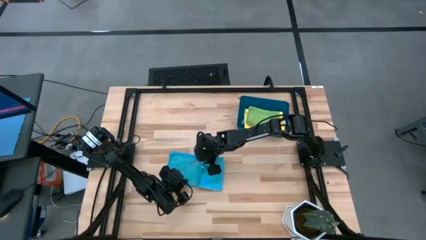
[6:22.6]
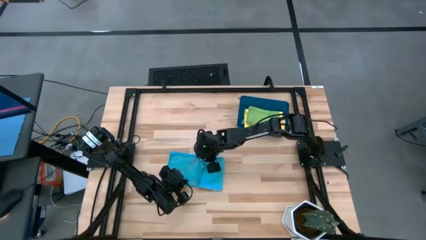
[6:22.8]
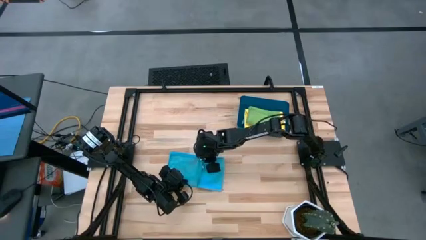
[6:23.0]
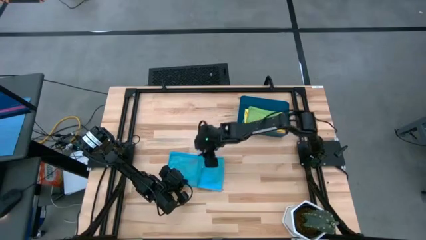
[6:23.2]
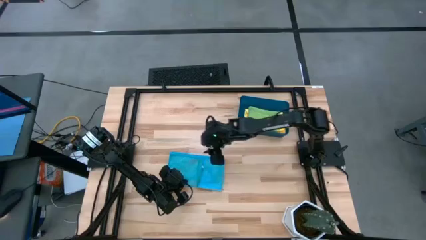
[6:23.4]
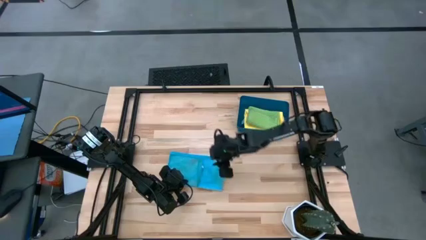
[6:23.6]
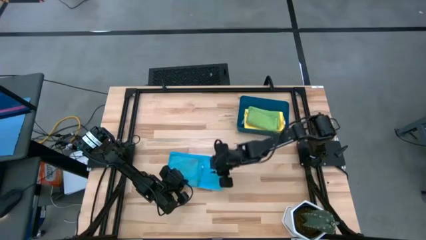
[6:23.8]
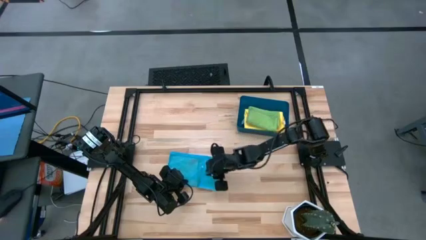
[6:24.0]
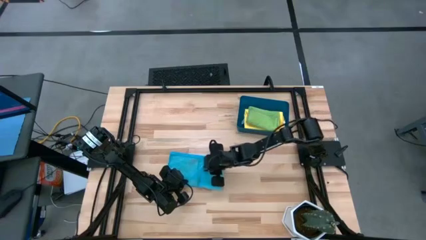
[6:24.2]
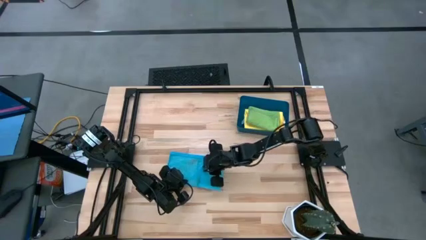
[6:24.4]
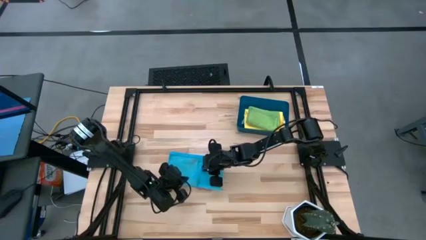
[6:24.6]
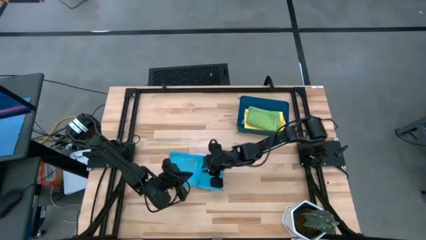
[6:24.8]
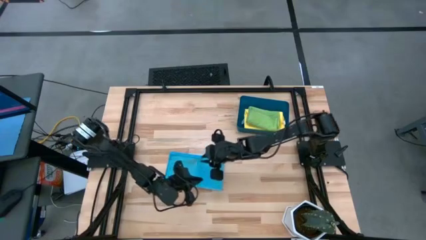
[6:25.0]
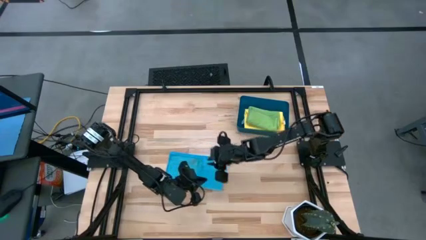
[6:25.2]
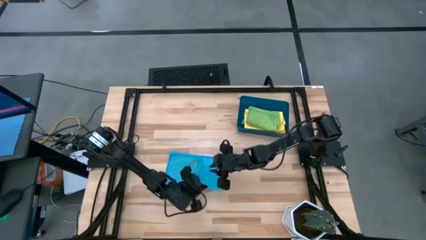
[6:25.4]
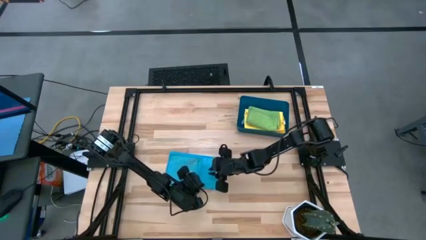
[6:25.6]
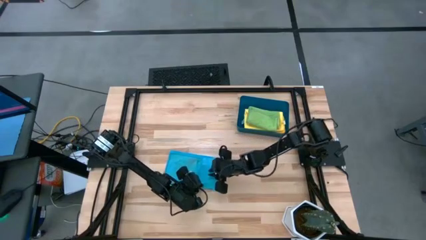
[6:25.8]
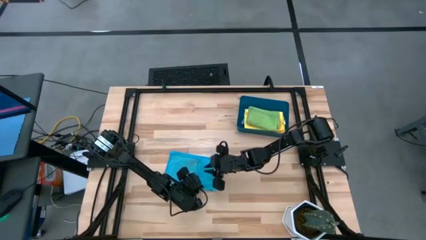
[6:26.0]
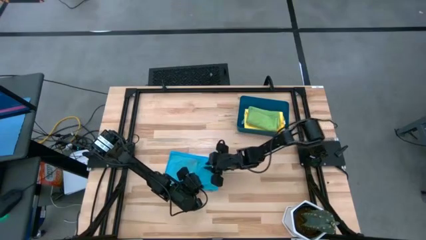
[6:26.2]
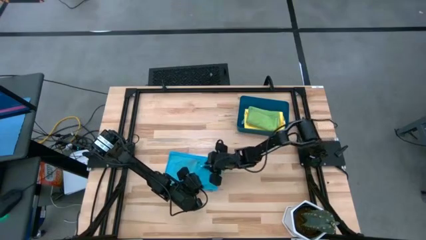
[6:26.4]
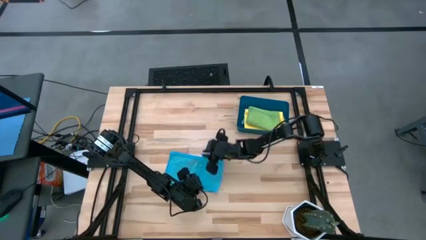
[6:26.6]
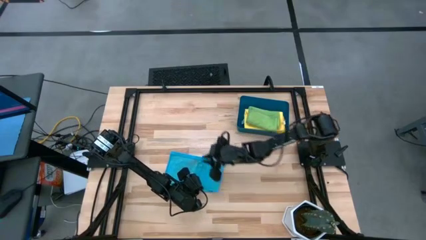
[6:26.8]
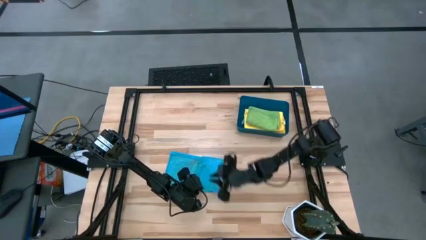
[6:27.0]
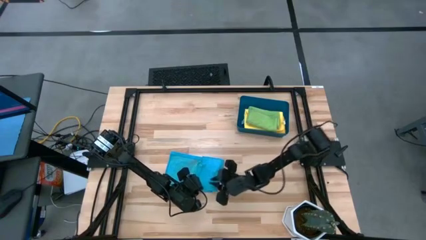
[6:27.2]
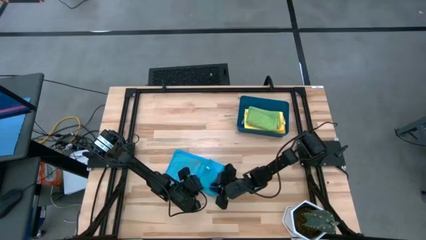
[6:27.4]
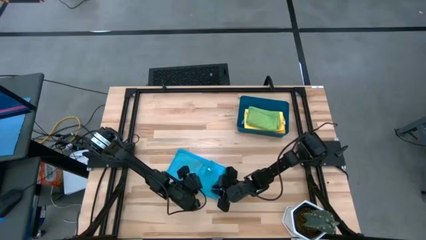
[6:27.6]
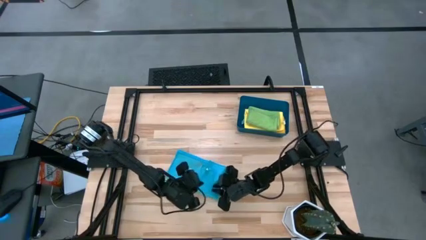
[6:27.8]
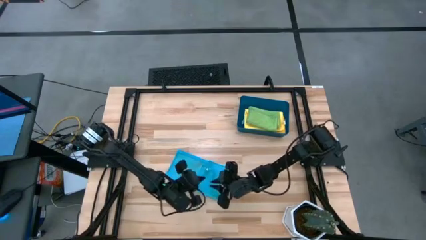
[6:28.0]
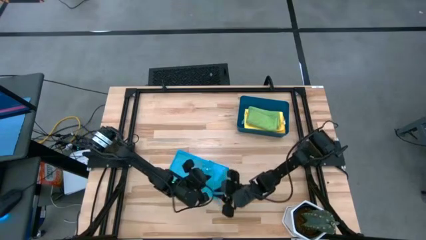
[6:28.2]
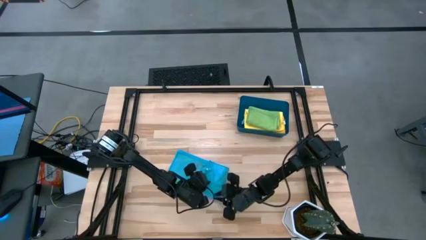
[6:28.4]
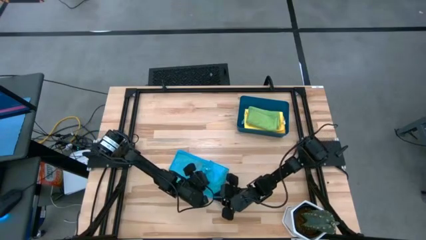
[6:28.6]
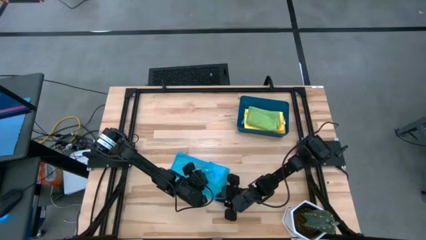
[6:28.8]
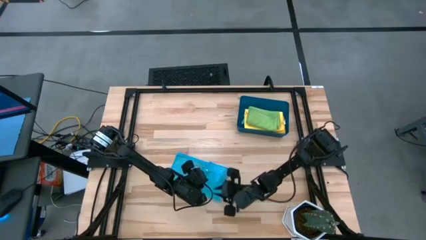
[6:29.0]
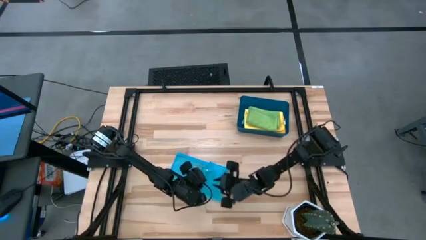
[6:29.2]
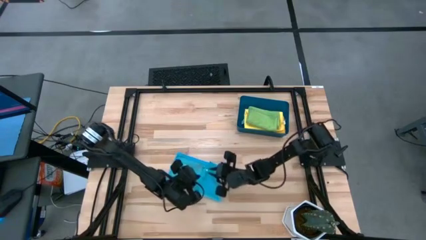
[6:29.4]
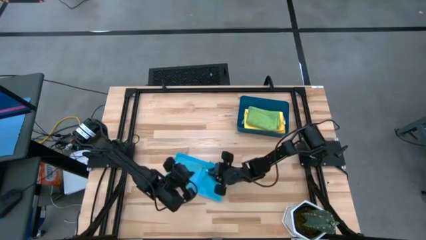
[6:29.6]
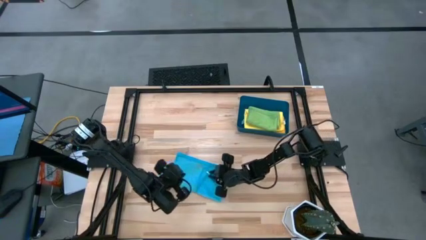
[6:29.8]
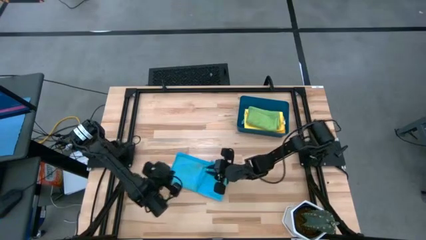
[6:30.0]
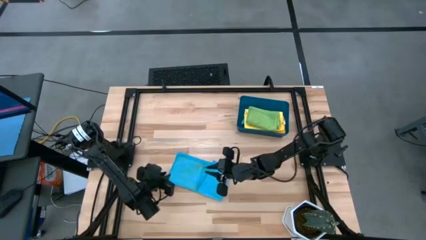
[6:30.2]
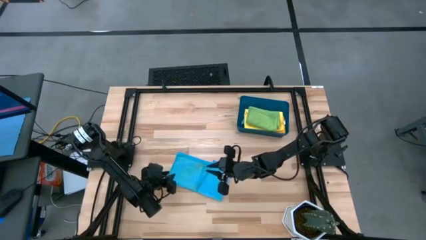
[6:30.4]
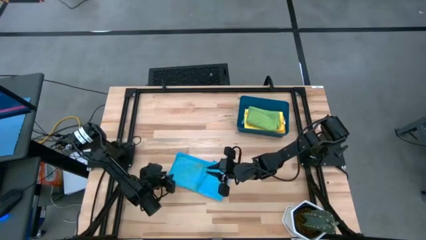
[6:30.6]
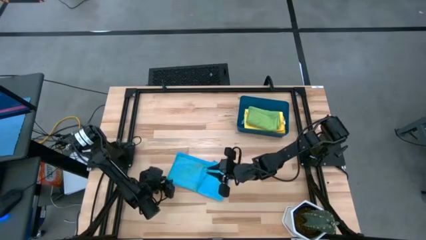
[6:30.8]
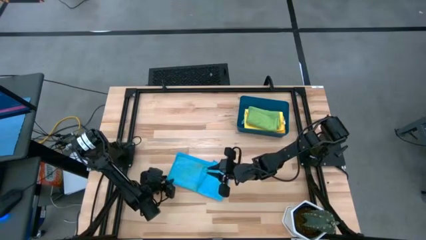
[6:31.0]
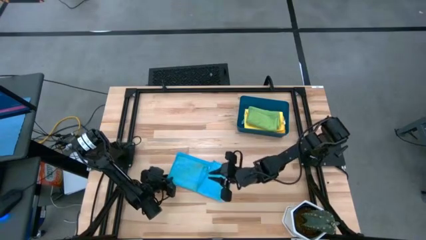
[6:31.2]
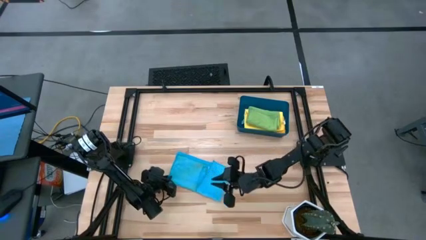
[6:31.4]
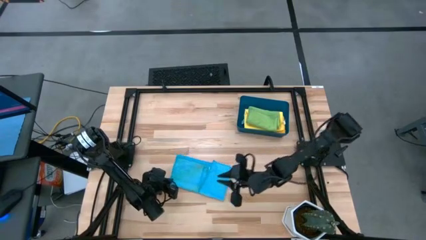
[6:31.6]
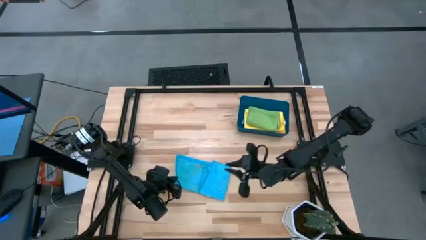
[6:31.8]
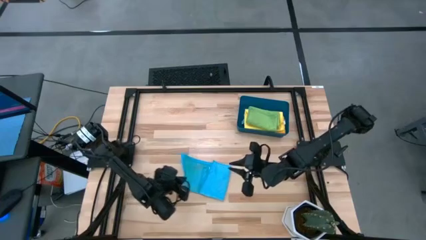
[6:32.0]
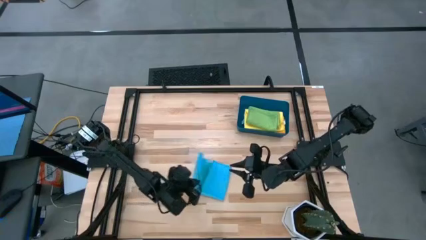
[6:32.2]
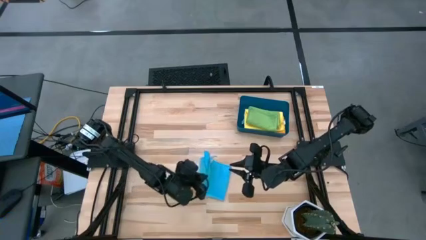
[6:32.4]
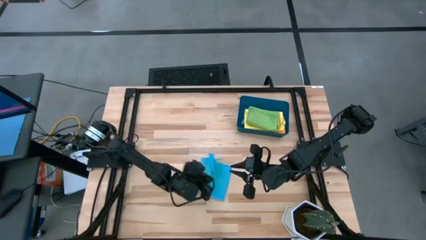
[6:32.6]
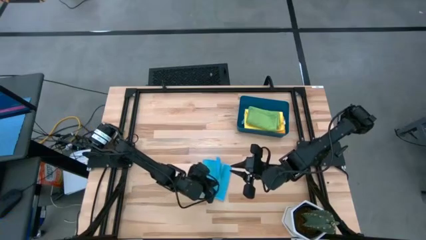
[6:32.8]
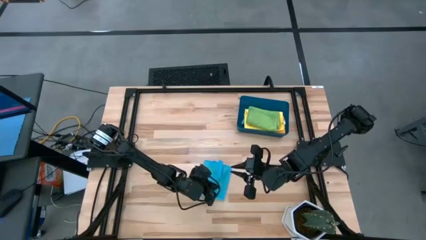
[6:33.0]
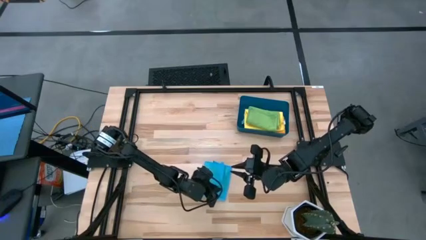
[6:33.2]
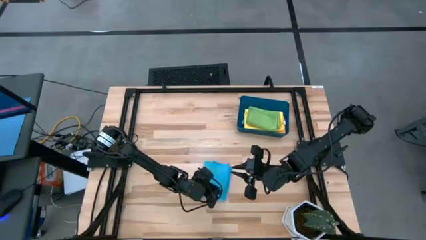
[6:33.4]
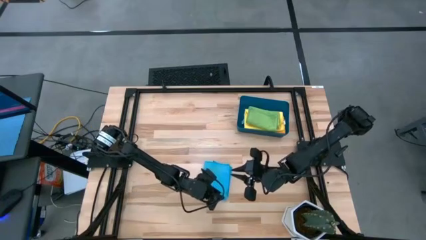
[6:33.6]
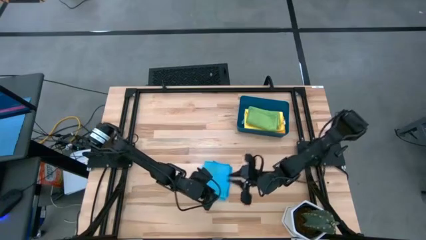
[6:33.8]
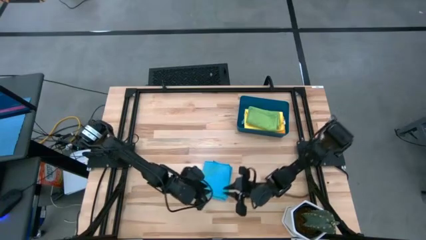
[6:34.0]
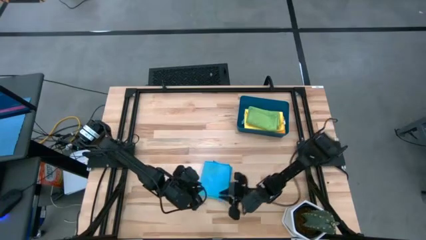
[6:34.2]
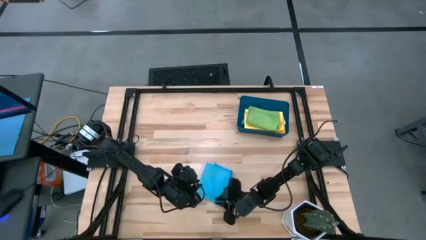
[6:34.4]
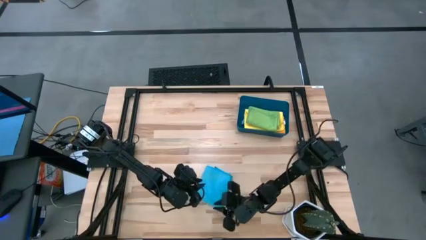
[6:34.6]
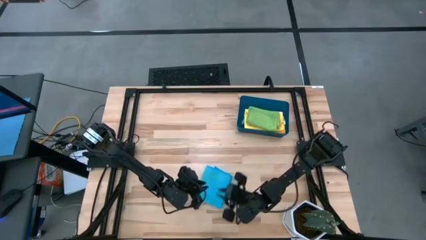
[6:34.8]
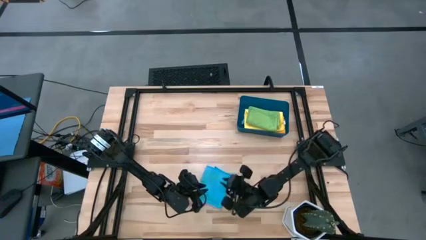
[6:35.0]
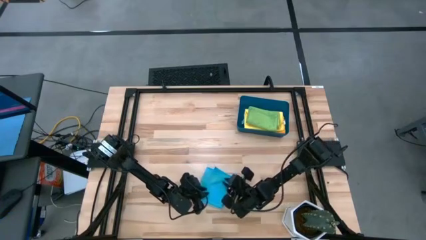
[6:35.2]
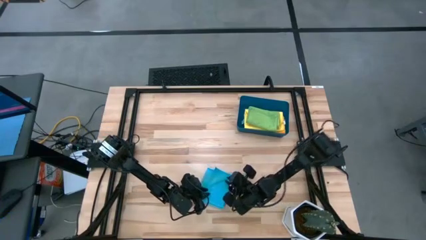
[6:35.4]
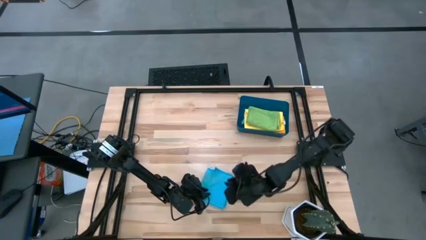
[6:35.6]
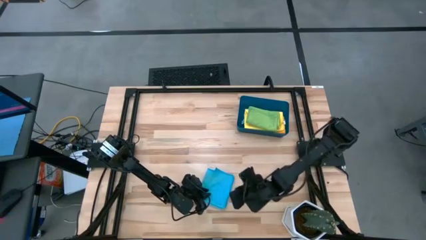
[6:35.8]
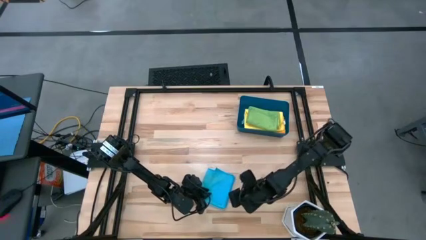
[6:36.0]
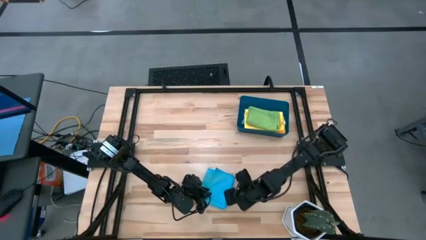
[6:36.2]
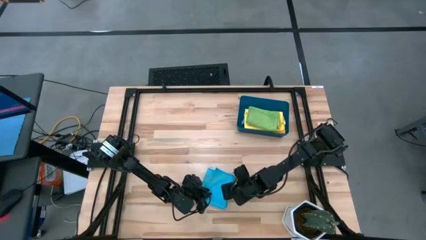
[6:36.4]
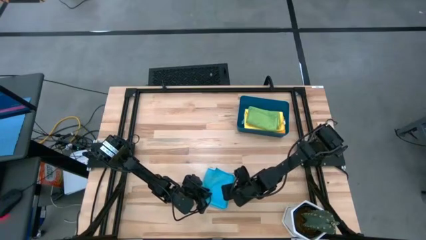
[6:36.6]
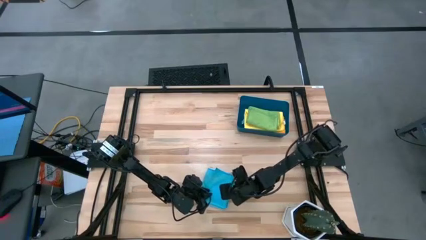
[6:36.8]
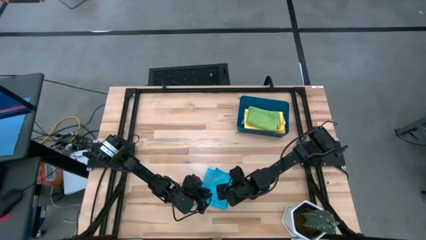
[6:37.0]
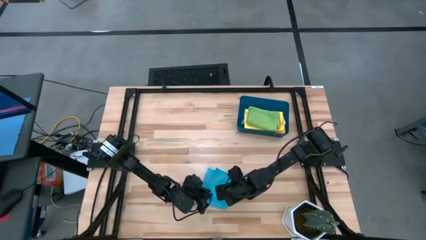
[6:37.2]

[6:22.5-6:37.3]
Task: Fold microfiber towels
Fold the blue microfiber cloth

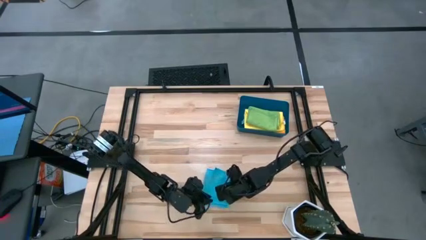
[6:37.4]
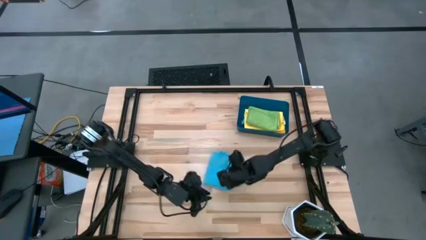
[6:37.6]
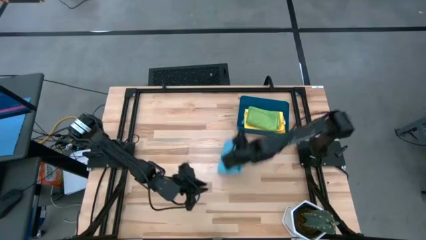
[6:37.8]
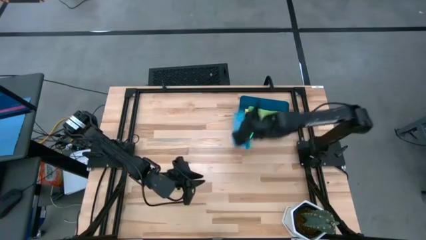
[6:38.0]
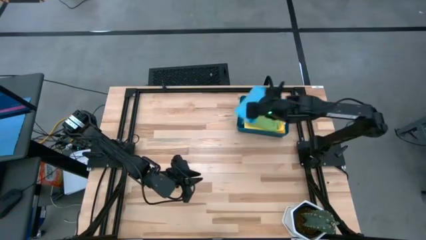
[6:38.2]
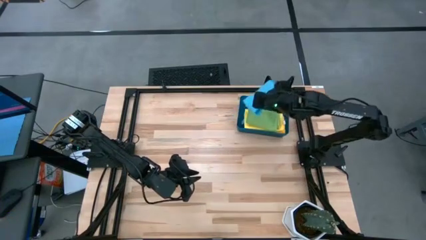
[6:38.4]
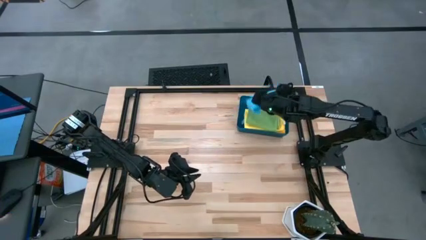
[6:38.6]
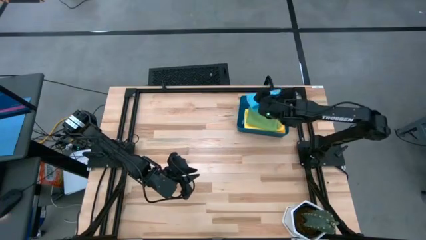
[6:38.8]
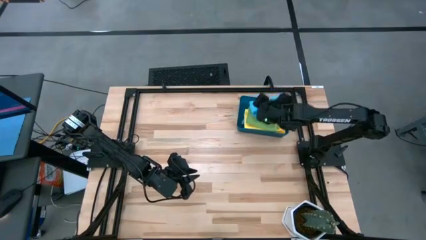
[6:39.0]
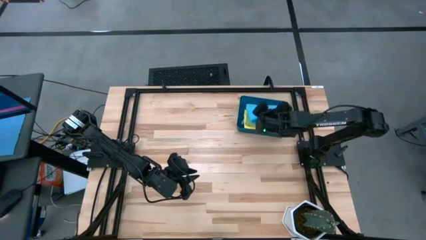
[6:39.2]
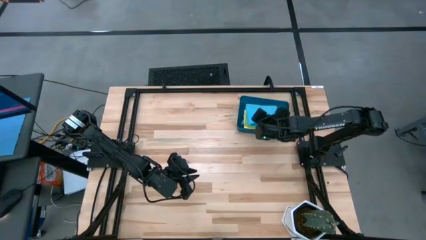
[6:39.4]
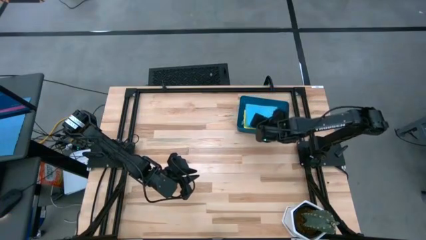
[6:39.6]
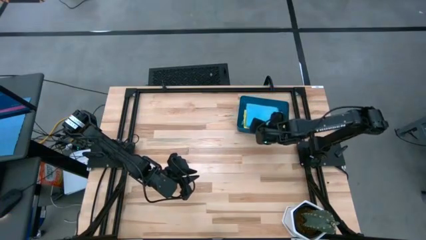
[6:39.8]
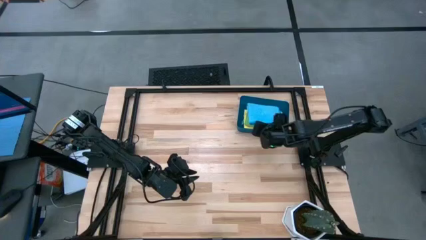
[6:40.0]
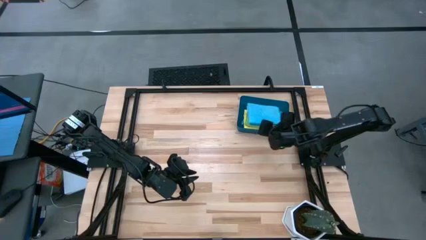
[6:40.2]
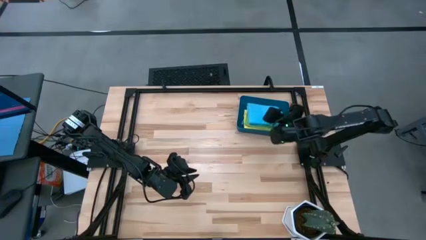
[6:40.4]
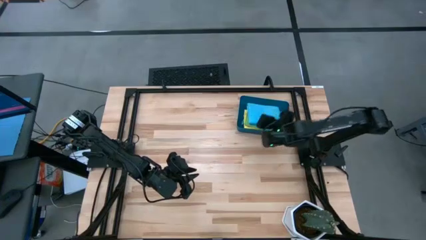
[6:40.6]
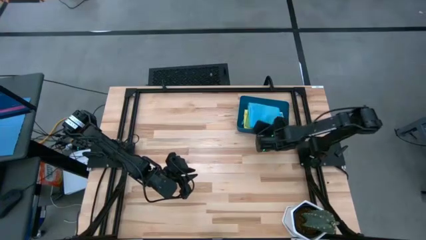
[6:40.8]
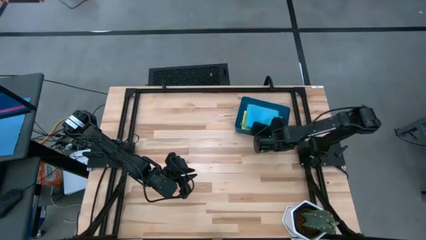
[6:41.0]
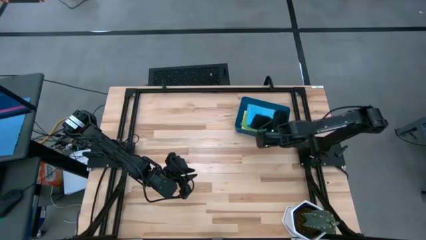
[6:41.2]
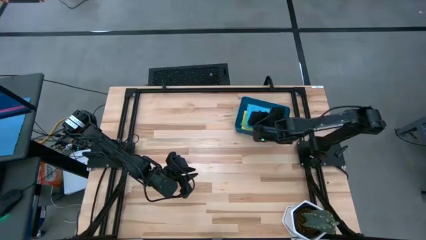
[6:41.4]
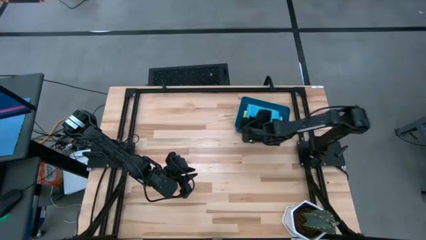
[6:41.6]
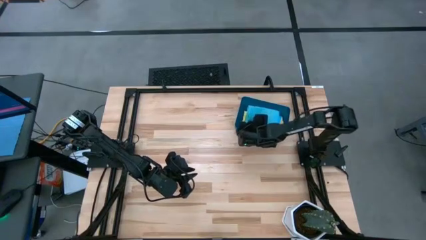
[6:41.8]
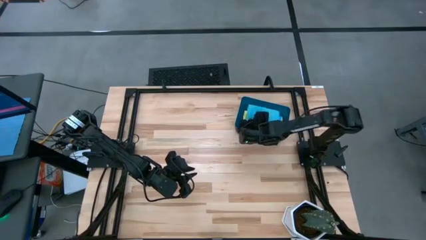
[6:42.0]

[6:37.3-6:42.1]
Put the blue microfiber cloth into the blue bin
